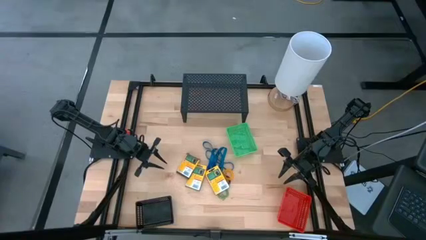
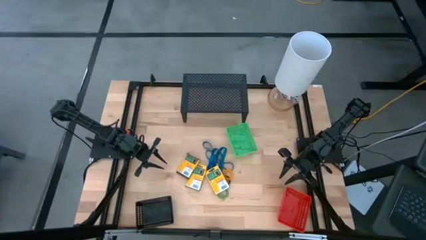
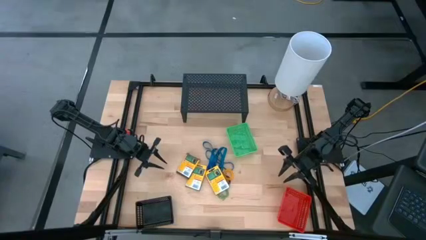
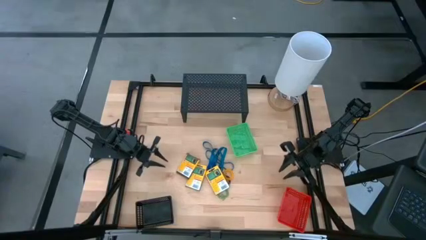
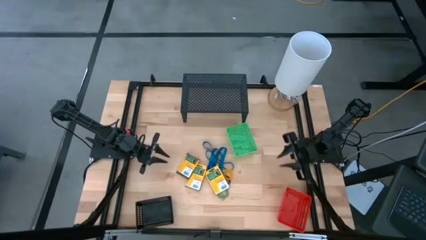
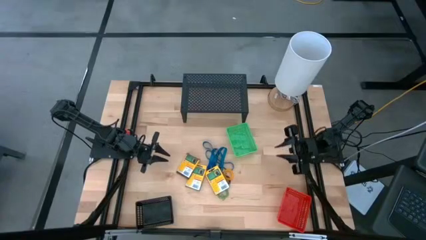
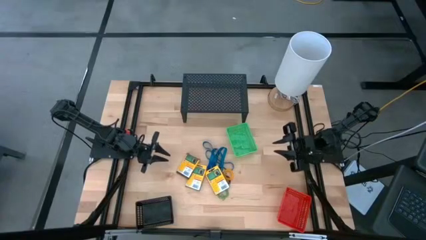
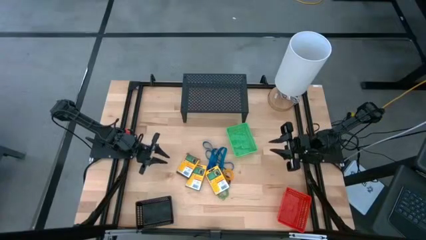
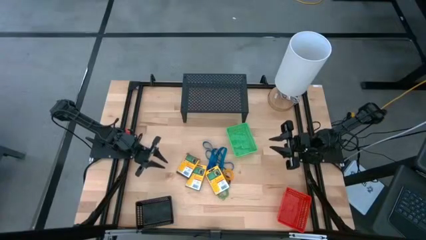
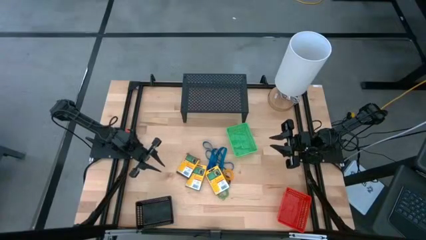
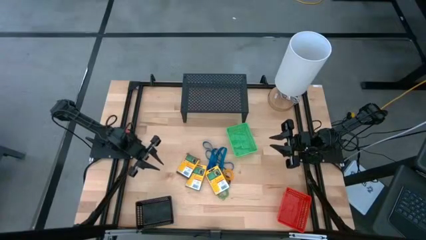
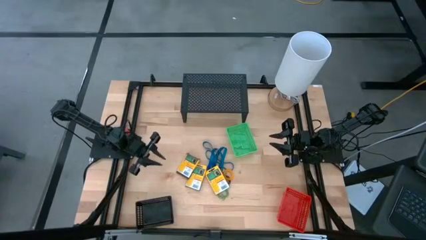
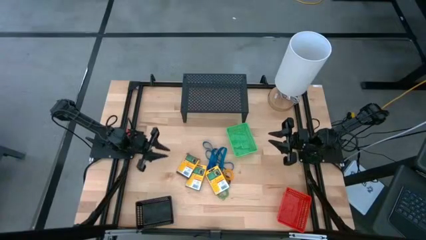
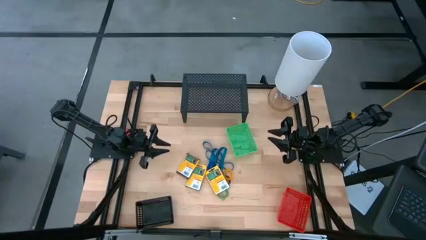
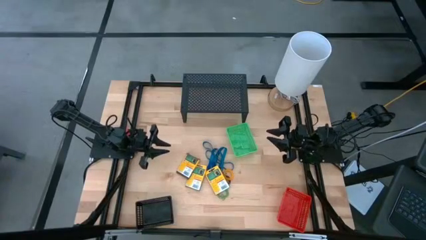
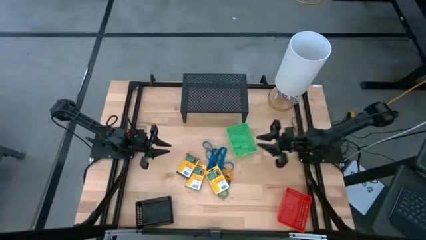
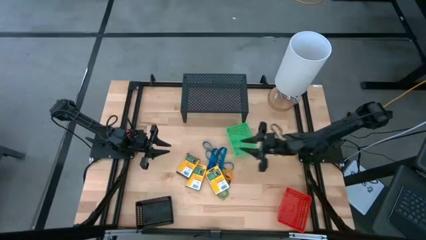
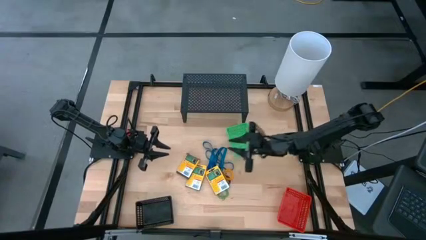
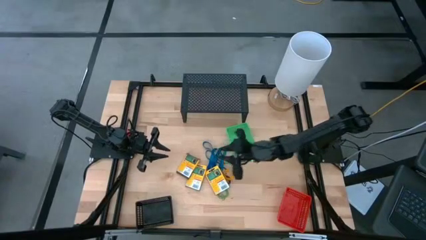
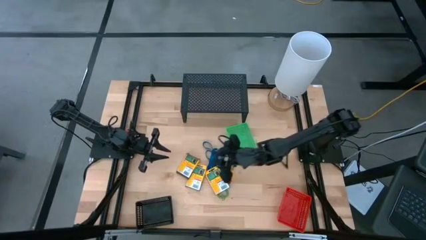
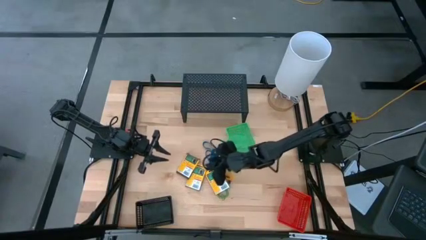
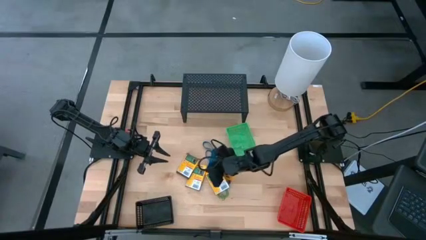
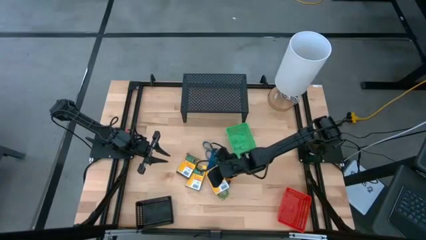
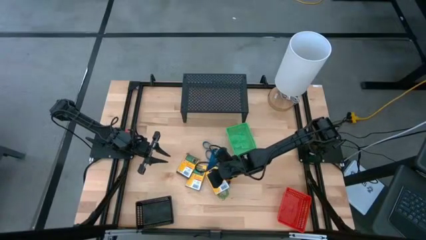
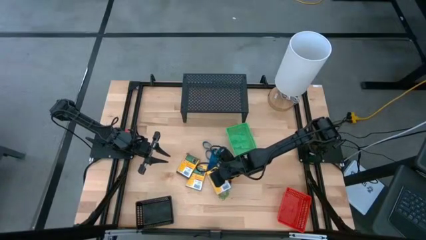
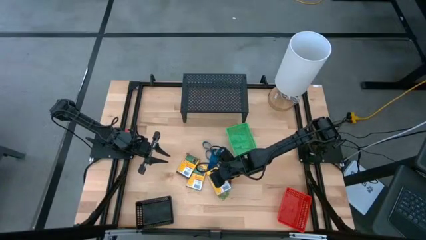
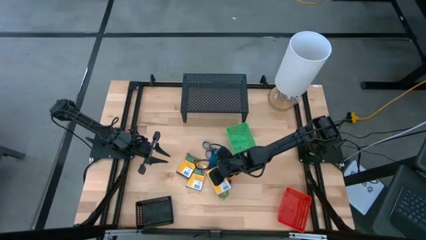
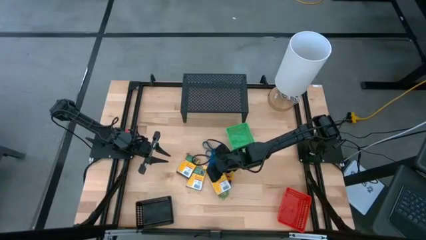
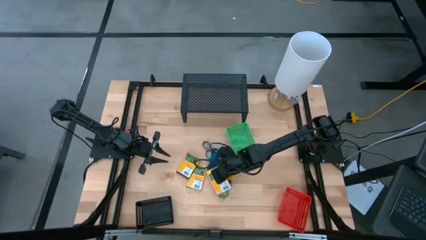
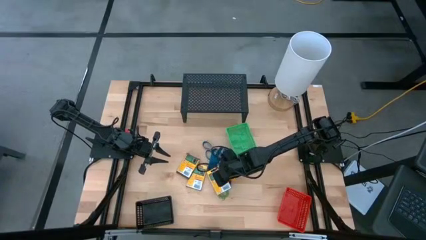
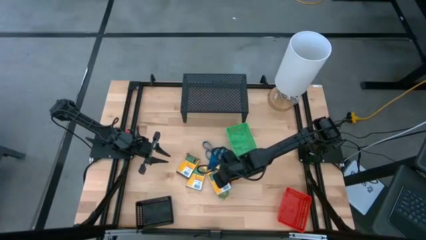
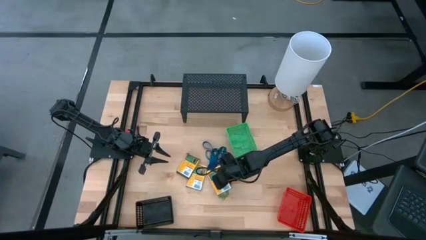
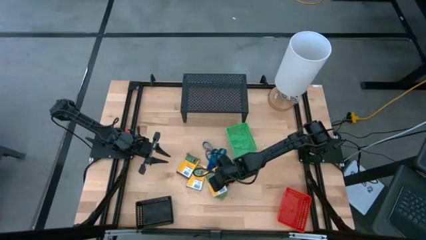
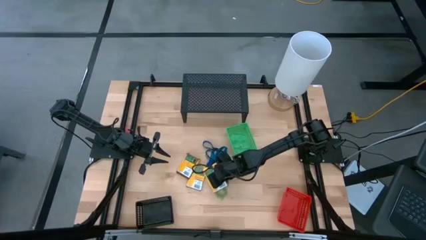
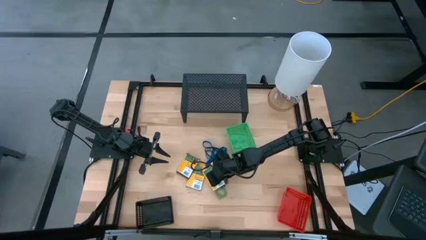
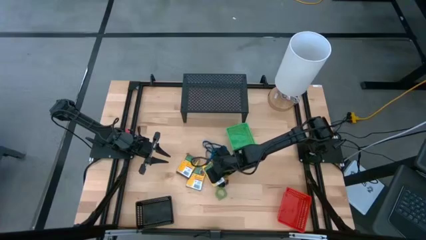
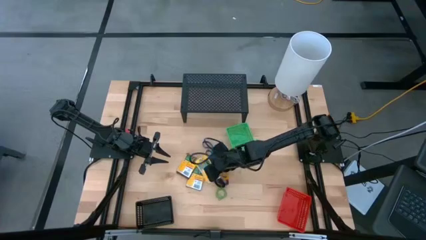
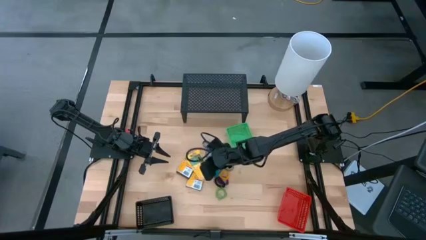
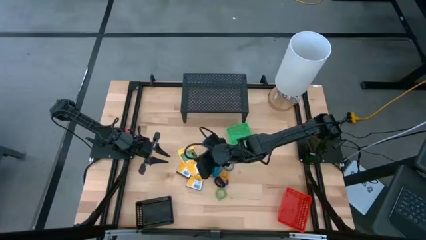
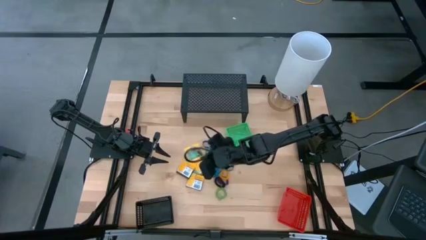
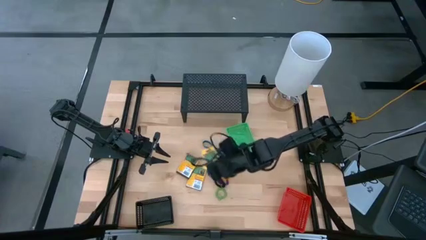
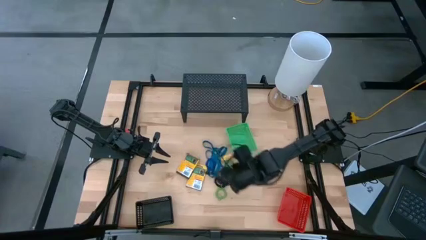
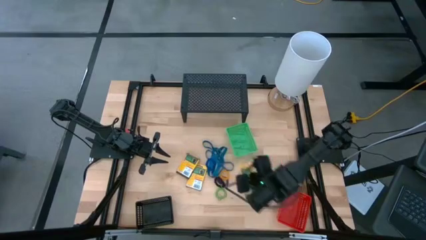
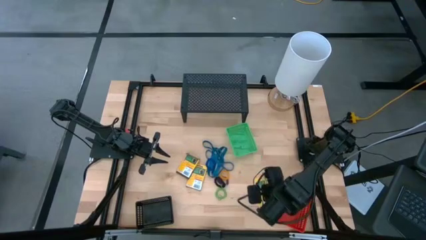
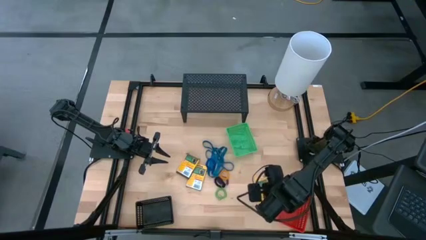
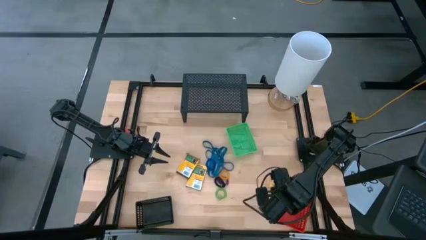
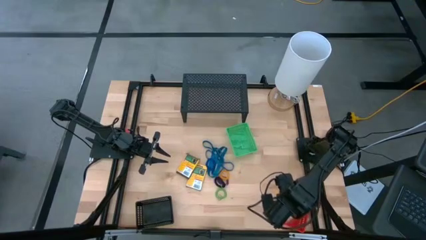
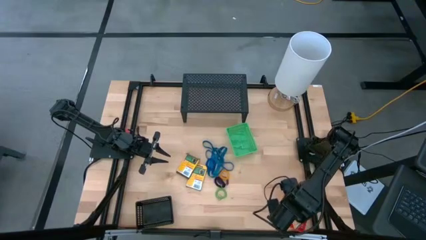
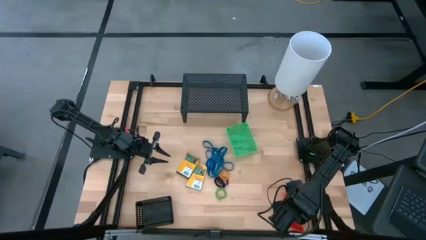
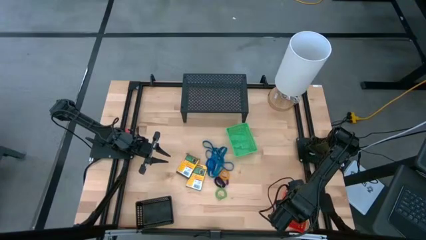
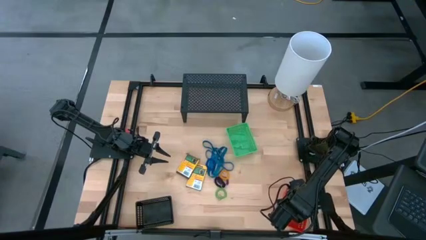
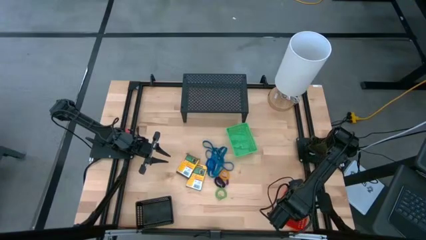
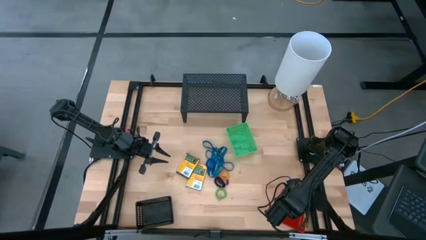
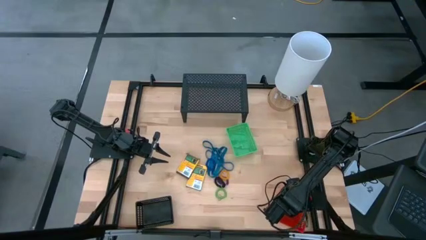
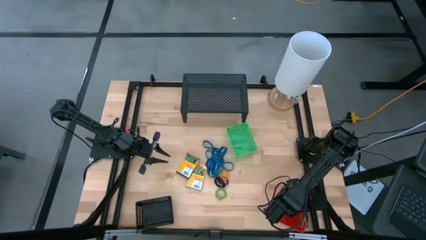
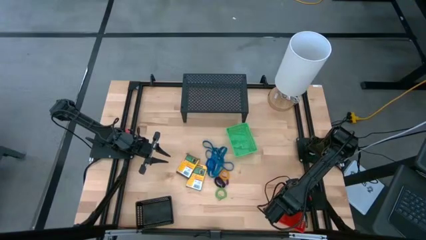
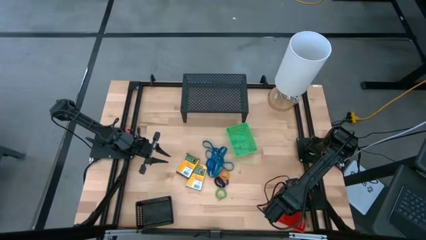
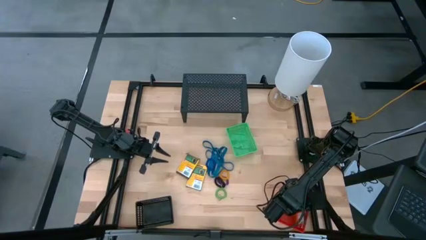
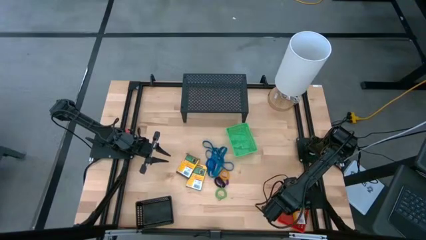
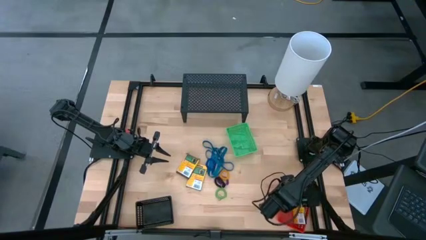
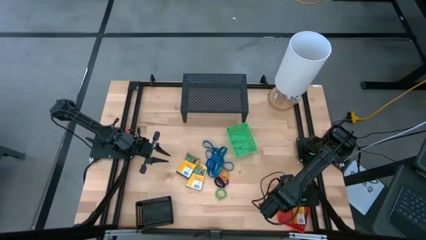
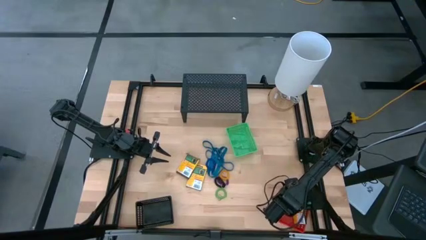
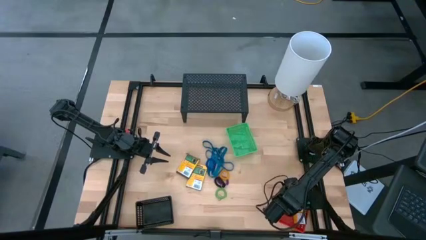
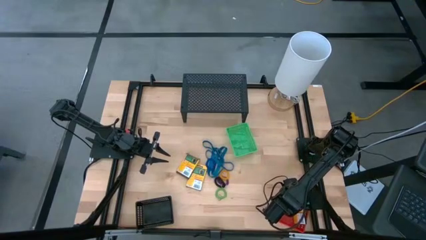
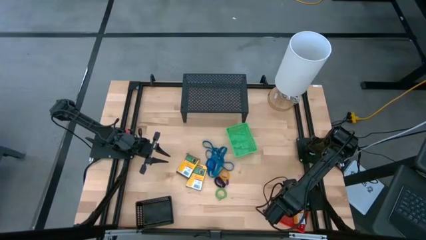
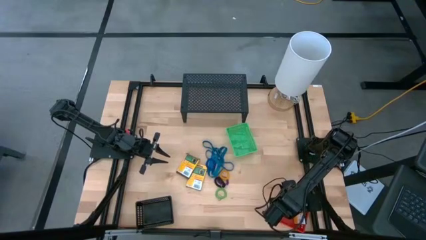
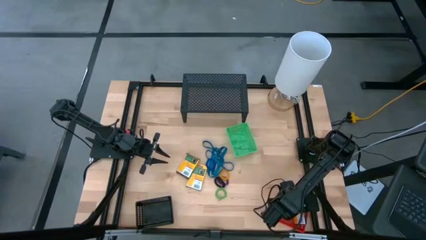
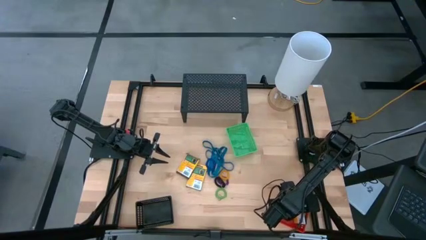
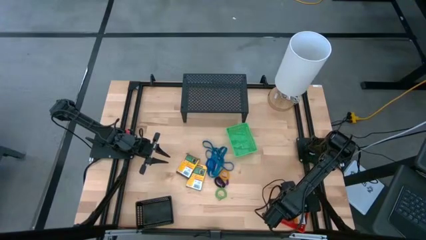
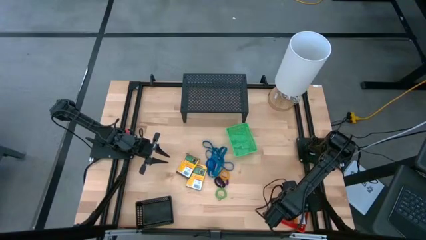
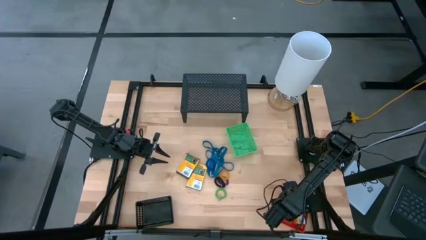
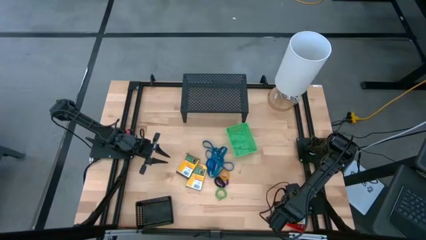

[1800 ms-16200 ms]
Task: Pick & Place Office Desk Supplies
Put the crayon box into the red basket
